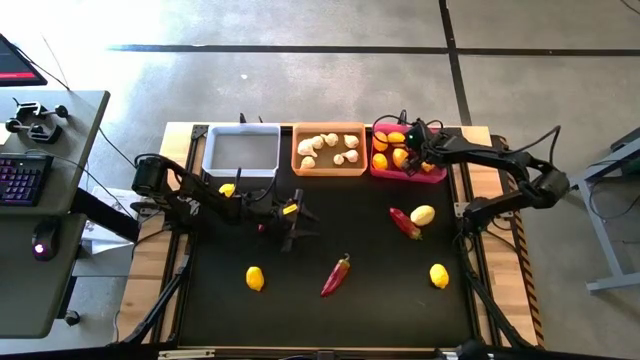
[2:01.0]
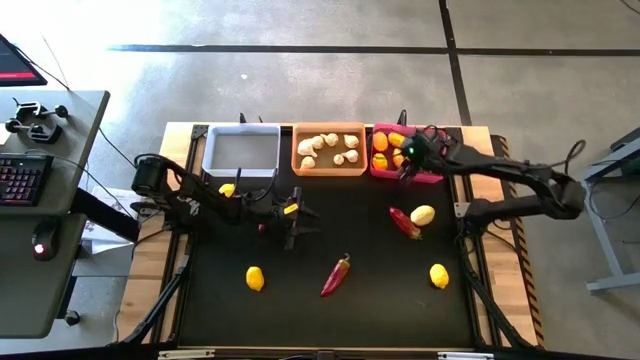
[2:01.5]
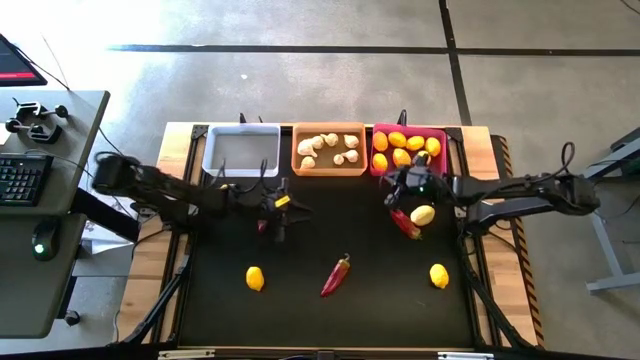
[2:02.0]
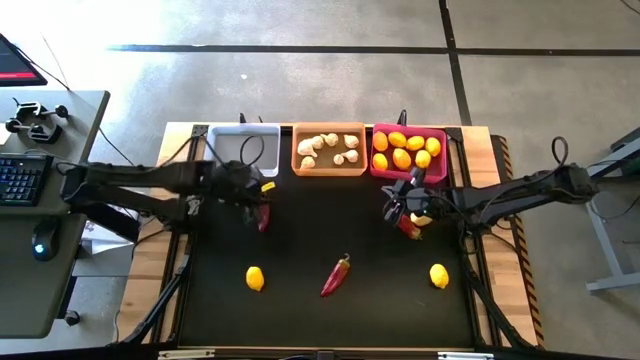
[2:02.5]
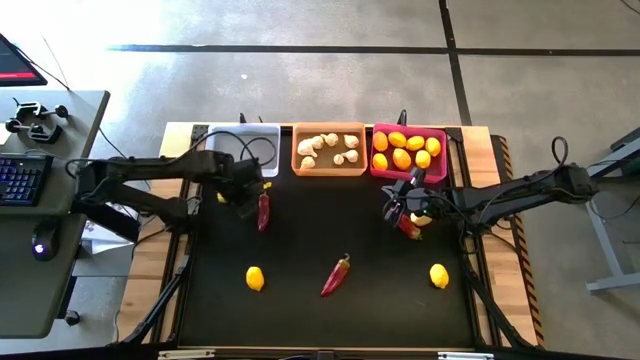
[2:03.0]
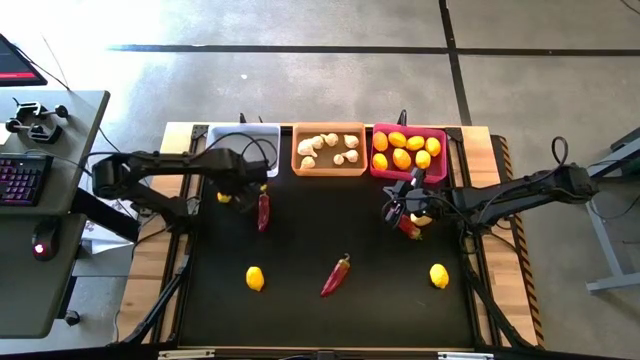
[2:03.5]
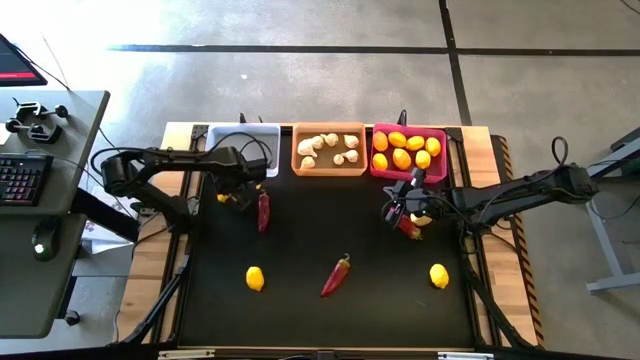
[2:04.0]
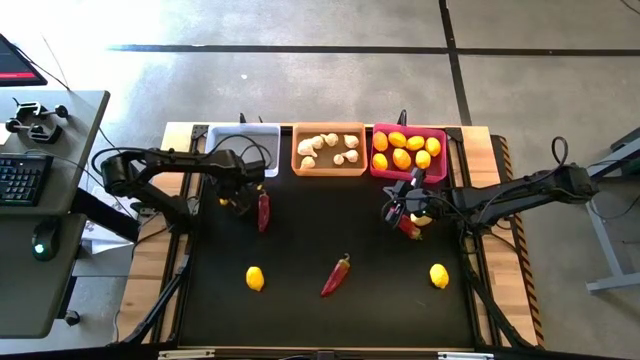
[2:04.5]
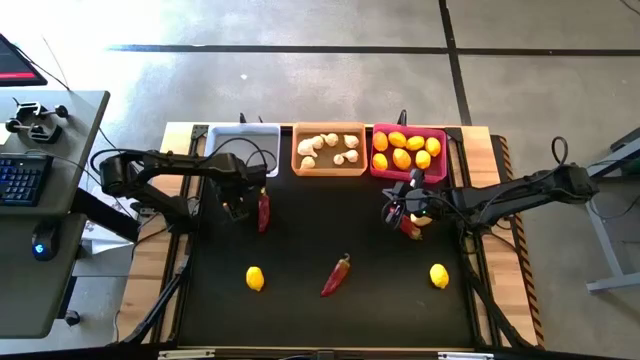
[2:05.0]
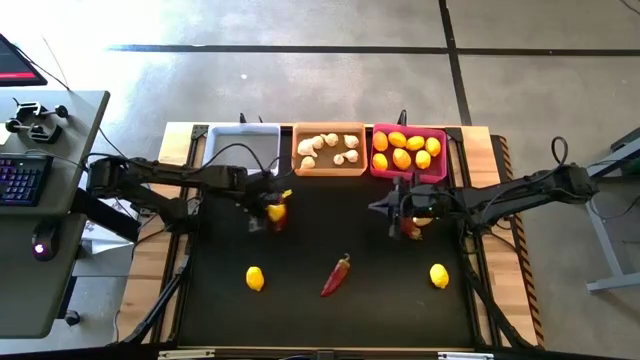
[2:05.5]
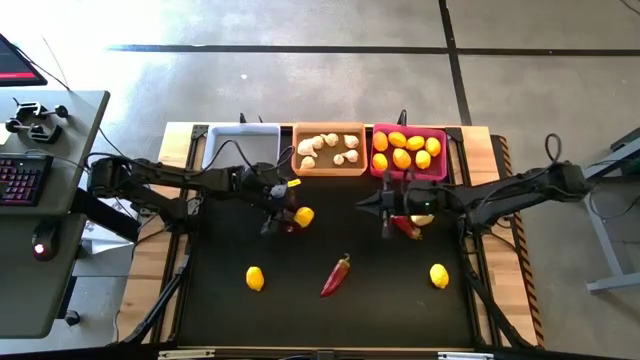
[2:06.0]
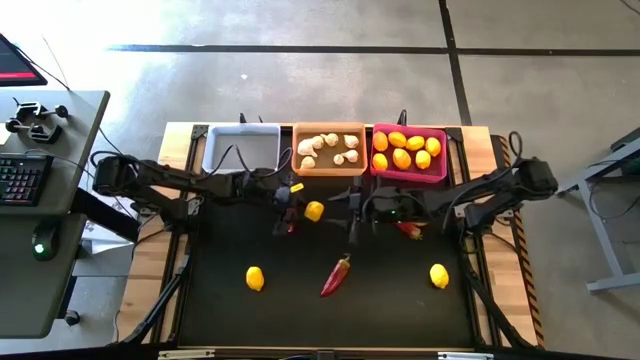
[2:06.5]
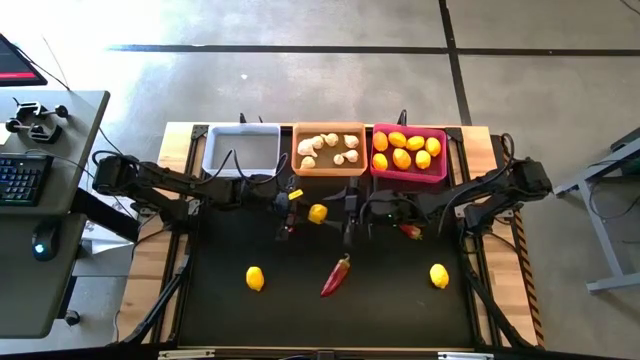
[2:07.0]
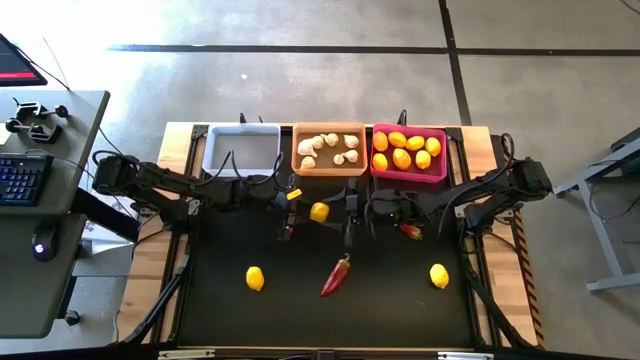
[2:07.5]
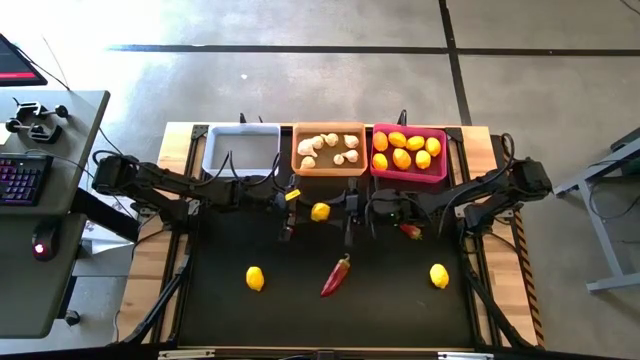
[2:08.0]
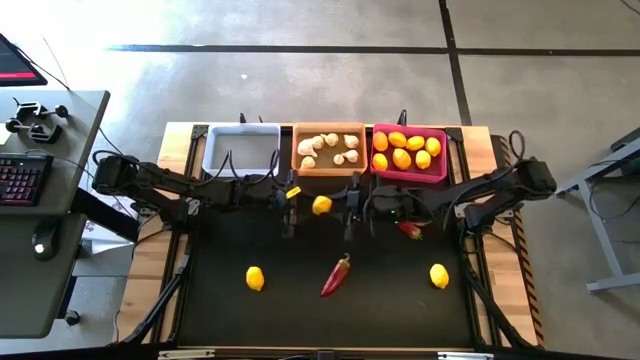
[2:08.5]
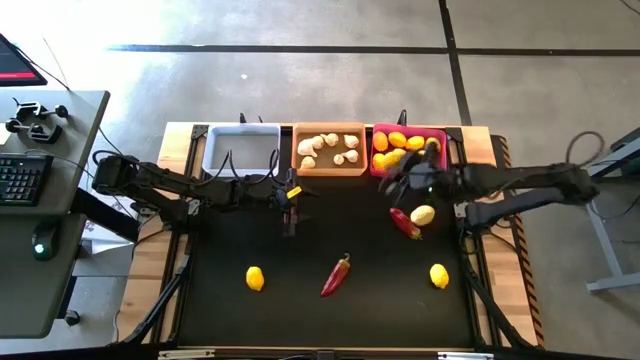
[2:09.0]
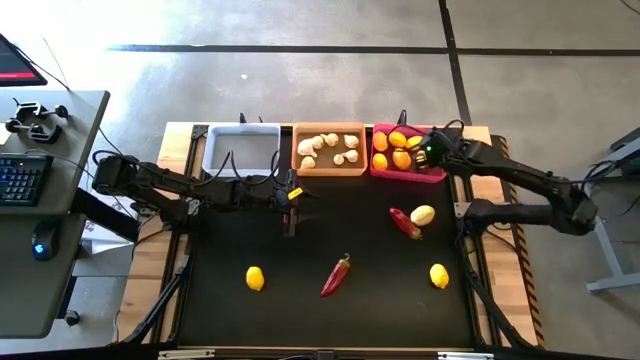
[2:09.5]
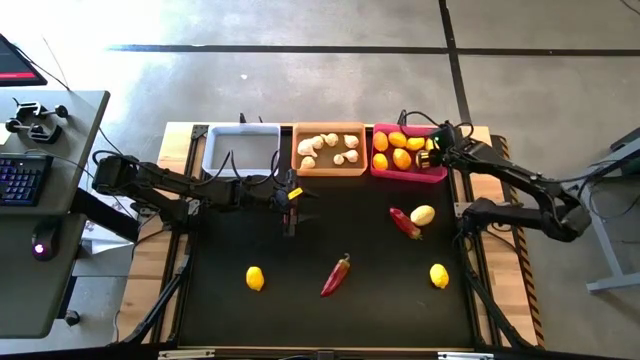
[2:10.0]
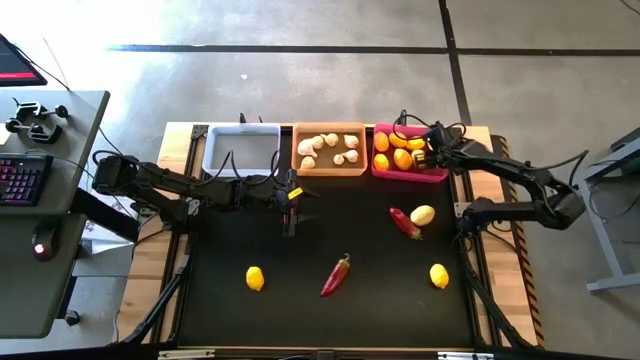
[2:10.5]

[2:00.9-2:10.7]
Task: Sort produce into baskets
Put the yellow lemon into the pink bin

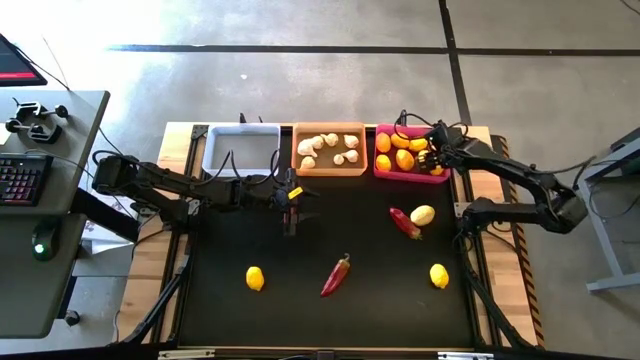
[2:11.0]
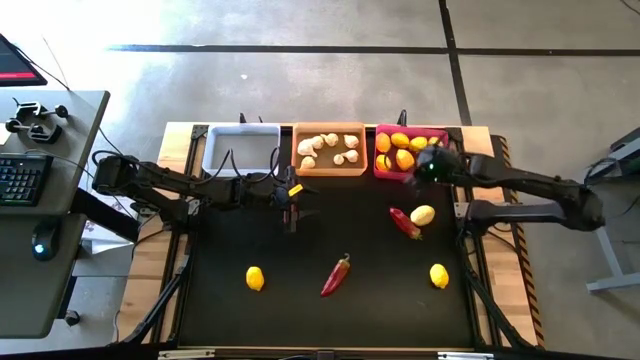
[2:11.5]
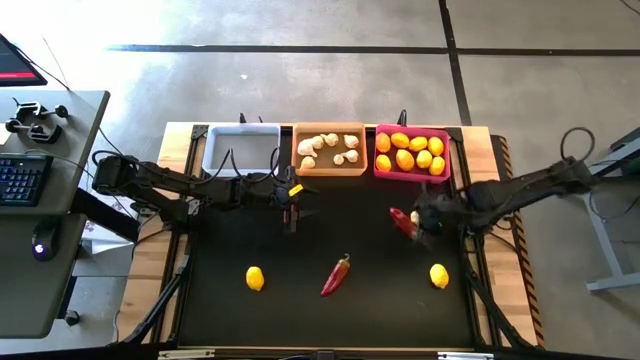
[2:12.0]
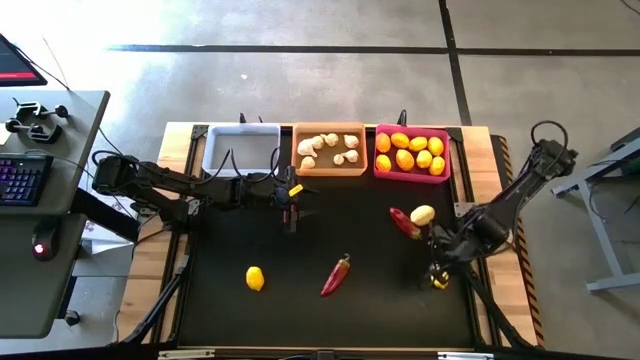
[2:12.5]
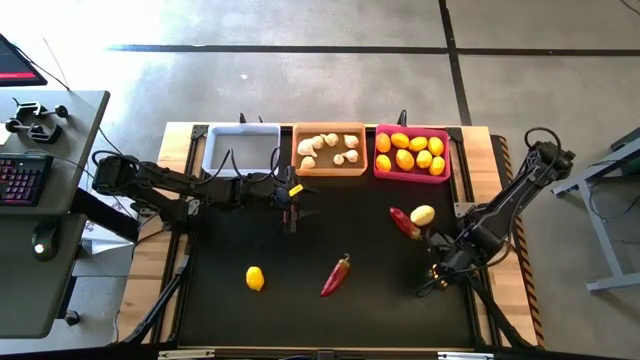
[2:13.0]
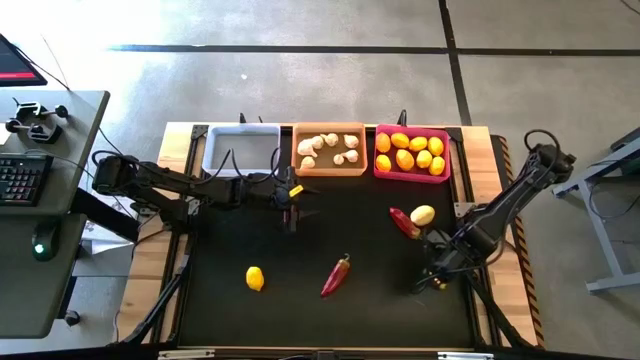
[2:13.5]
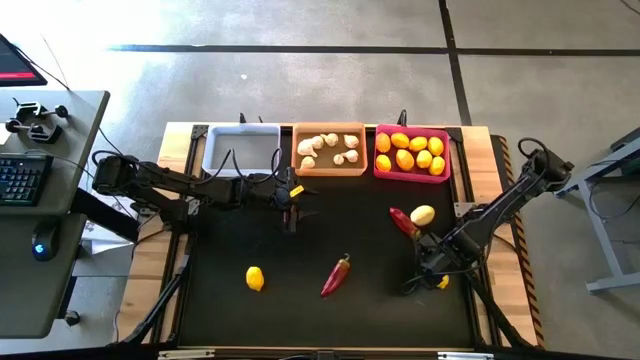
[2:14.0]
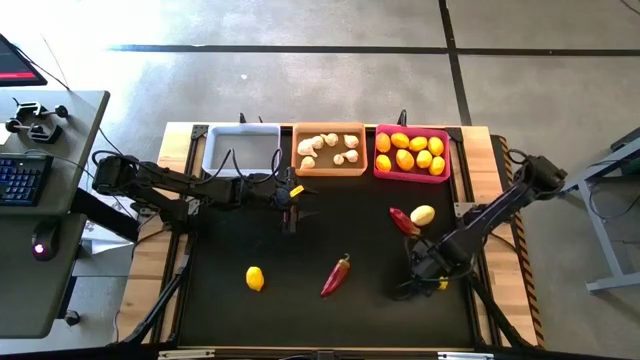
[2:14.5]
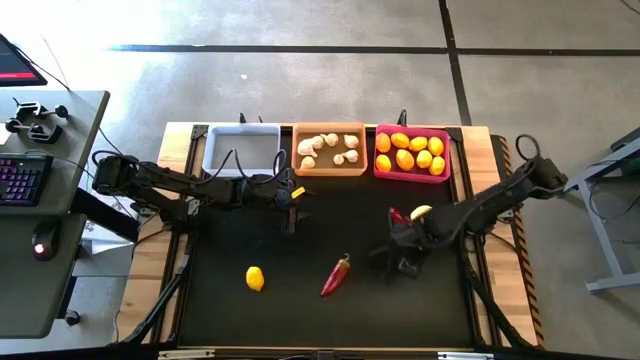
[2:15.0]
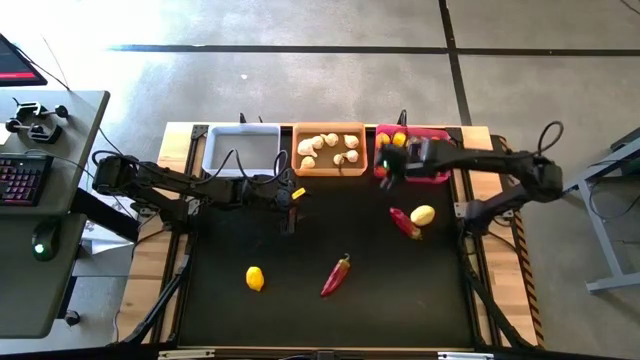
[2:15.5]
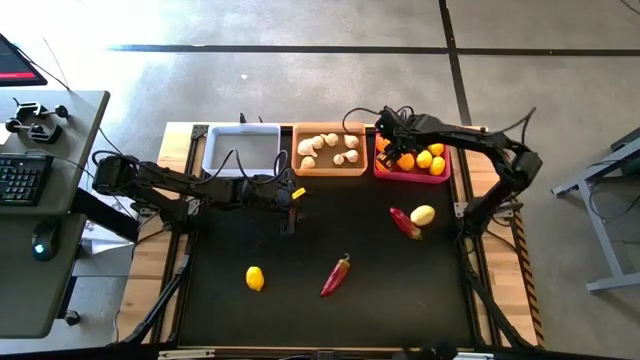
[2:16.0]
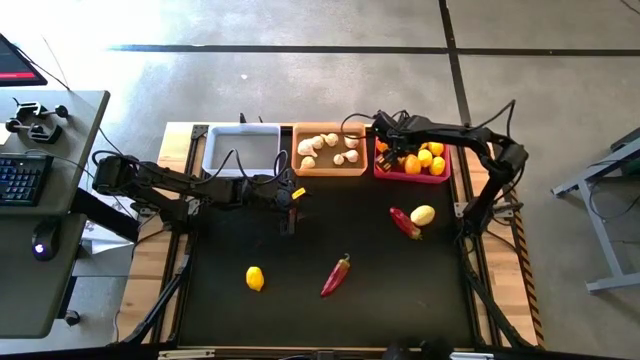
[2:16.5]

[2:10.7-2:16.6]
Put the orange lemon into the pink bin

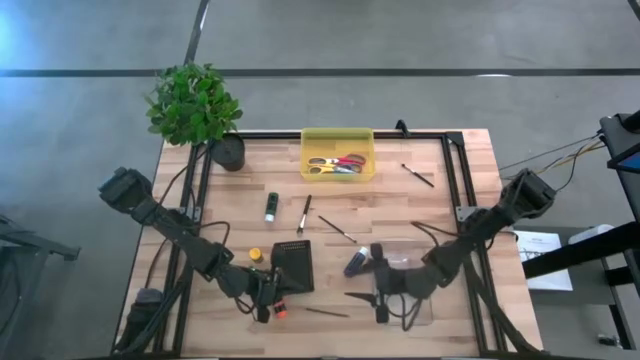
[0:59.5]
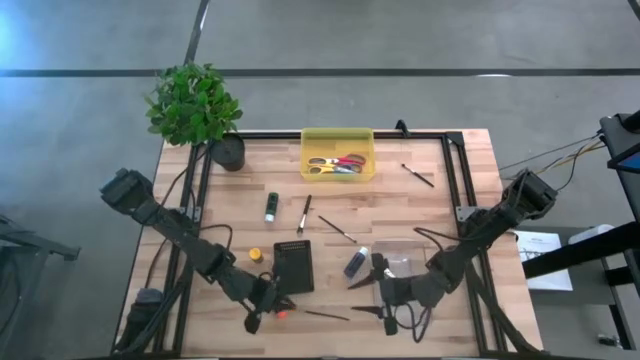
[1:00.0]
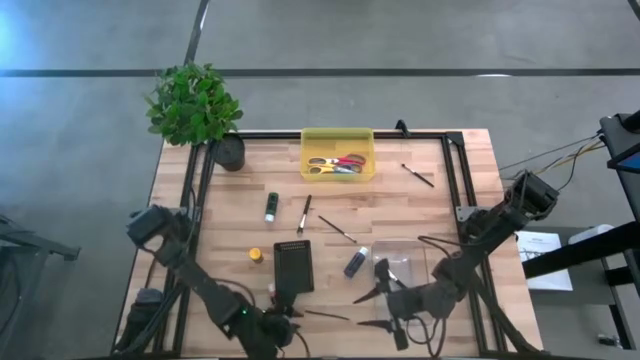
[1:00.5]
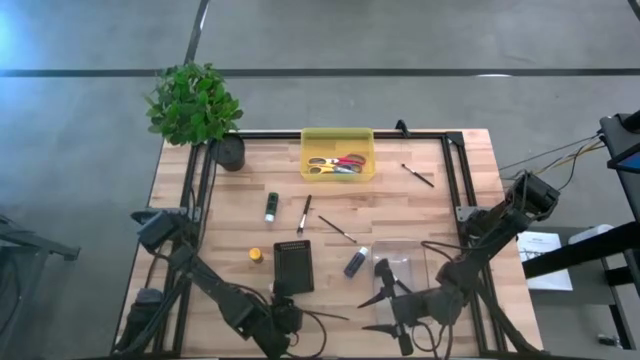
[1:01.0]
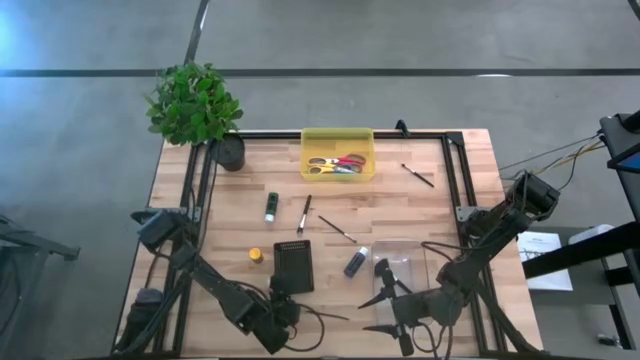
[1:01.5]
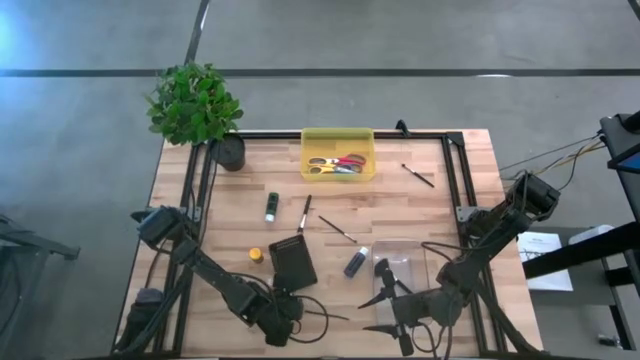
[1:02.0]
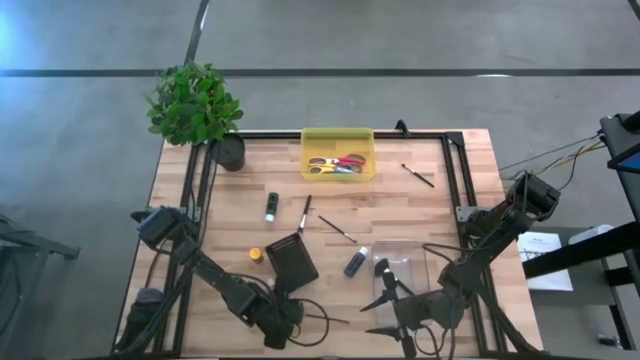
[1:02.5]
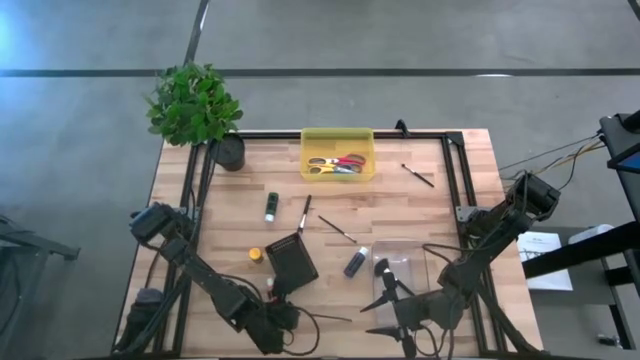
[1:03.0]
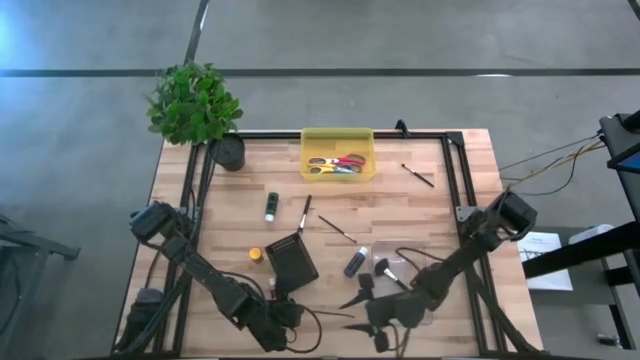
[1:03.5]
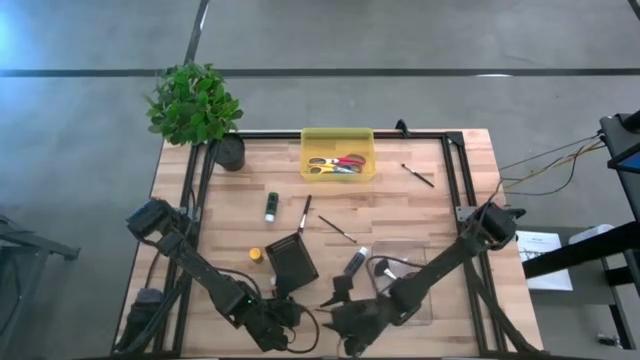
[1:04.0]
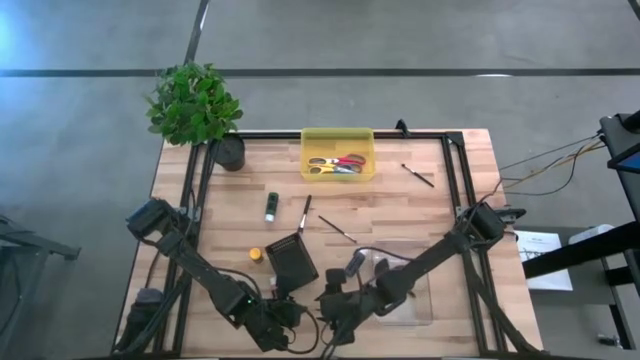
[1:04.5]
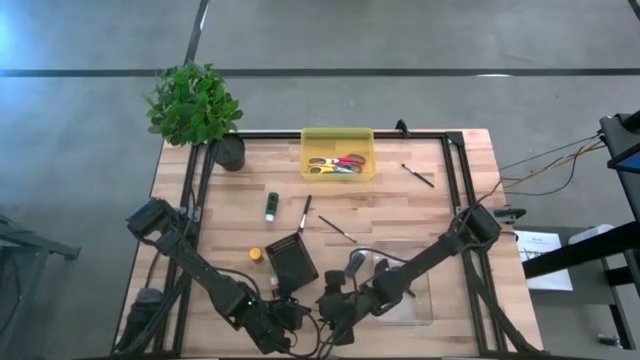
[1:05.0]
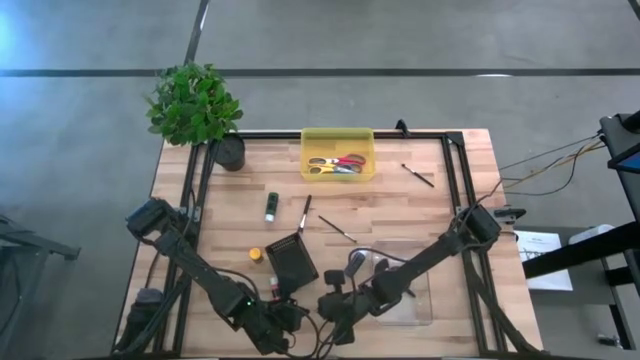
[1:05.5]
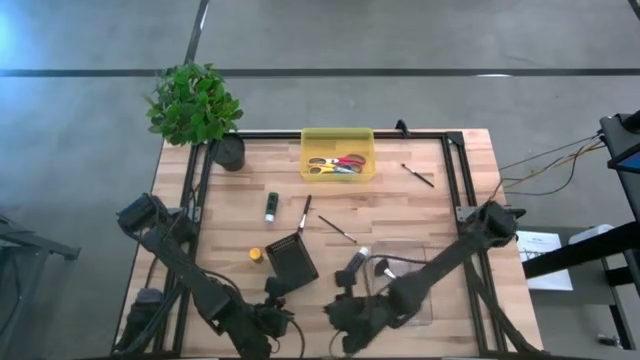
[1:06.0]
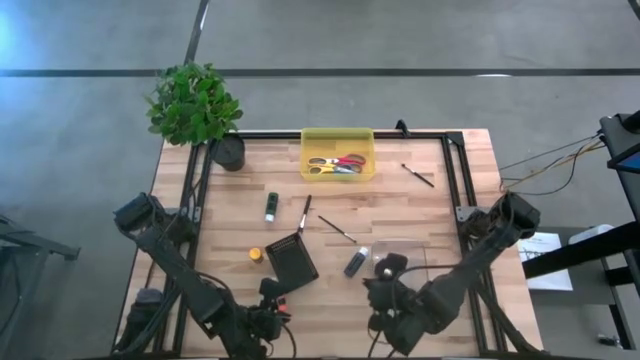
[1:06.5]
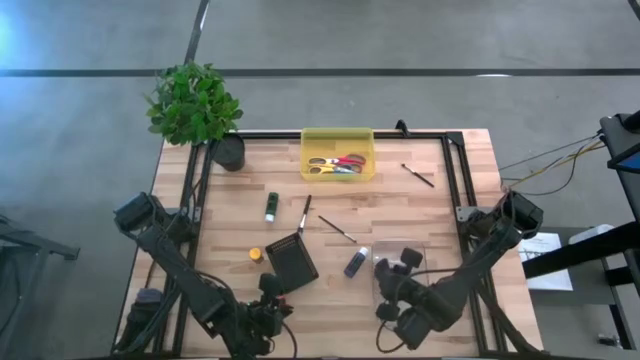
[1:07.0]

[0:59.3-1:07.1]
Task: Pick & Place Paint Supplies
Put the liner brush into the transparent bin
